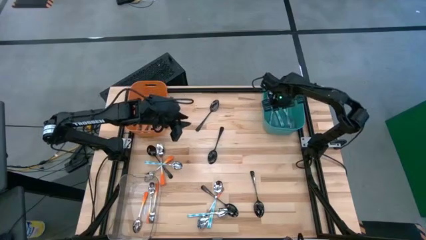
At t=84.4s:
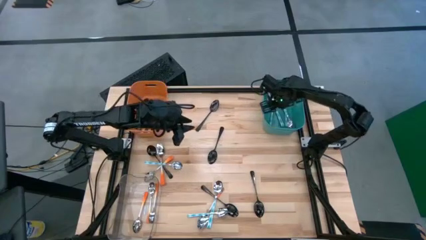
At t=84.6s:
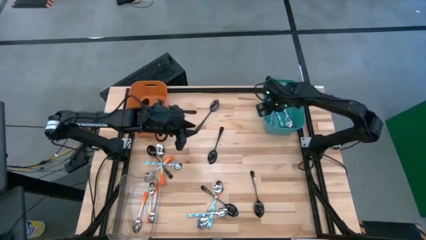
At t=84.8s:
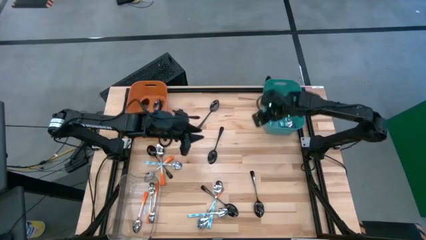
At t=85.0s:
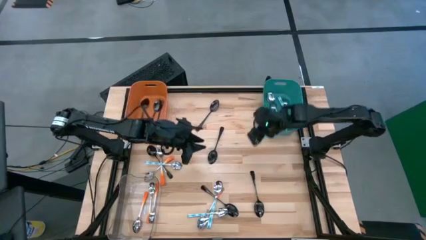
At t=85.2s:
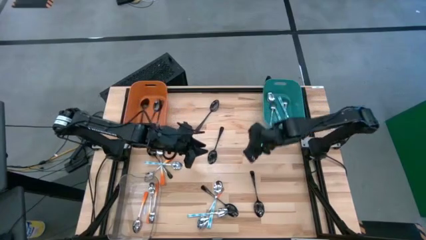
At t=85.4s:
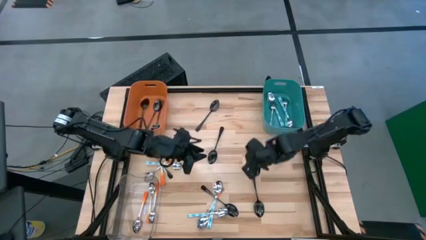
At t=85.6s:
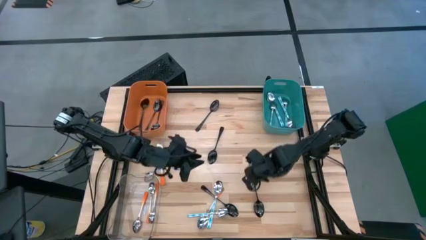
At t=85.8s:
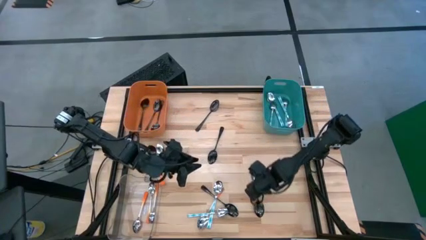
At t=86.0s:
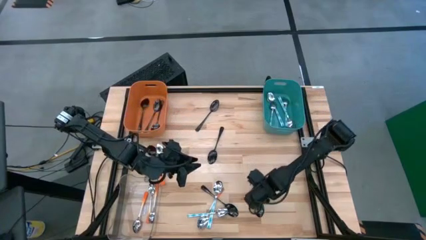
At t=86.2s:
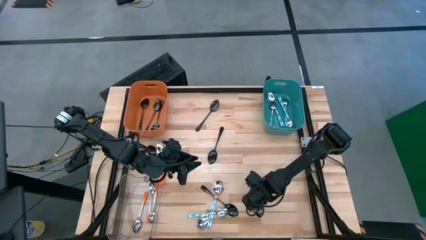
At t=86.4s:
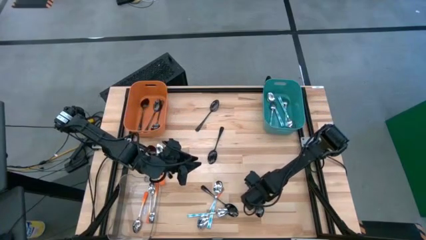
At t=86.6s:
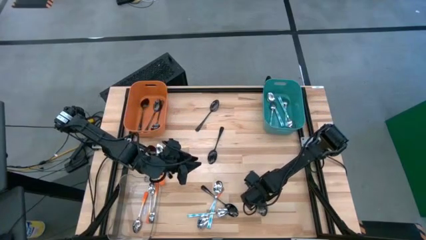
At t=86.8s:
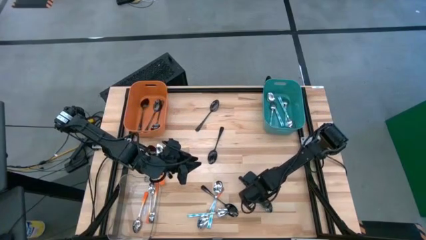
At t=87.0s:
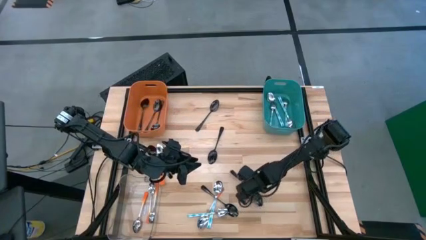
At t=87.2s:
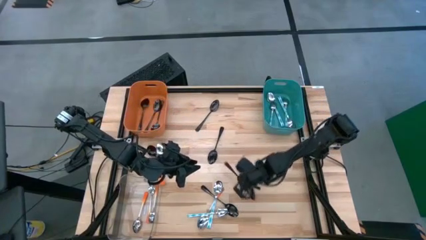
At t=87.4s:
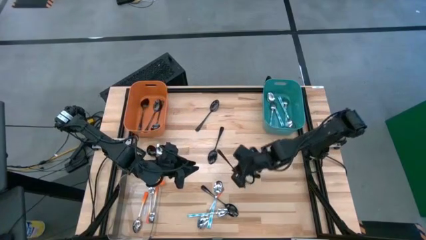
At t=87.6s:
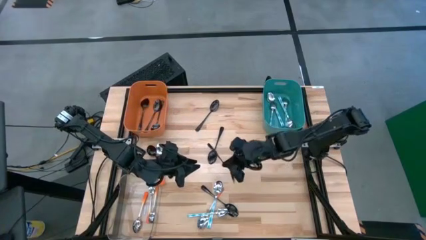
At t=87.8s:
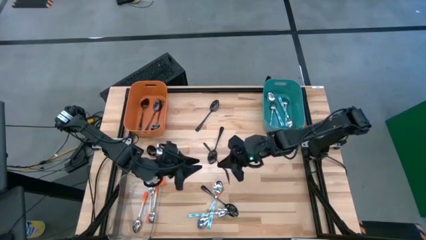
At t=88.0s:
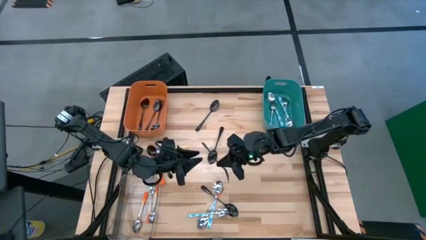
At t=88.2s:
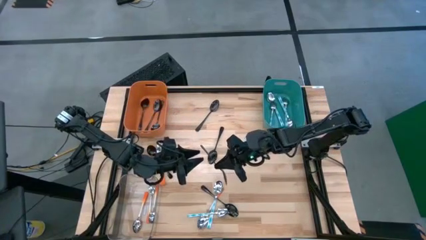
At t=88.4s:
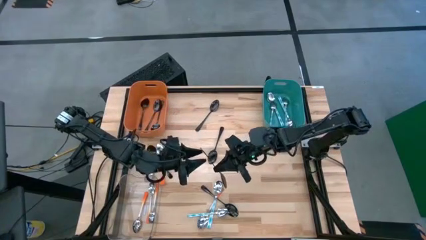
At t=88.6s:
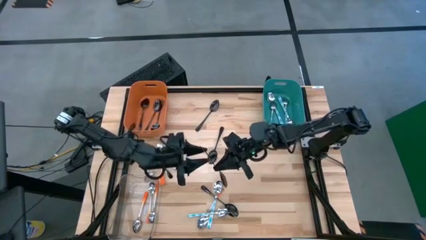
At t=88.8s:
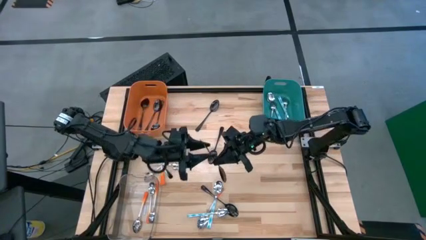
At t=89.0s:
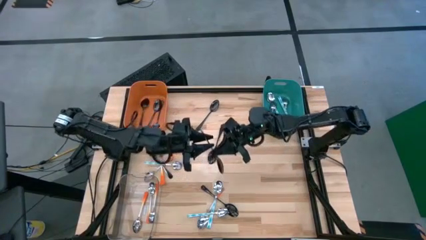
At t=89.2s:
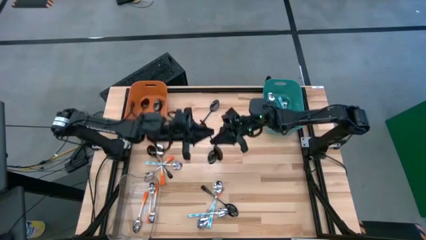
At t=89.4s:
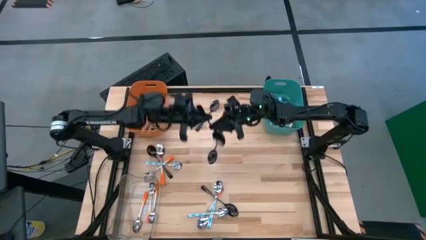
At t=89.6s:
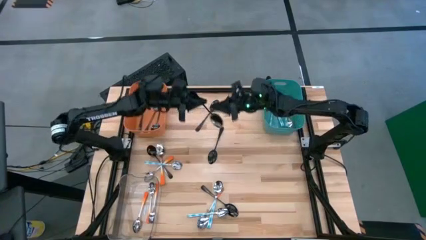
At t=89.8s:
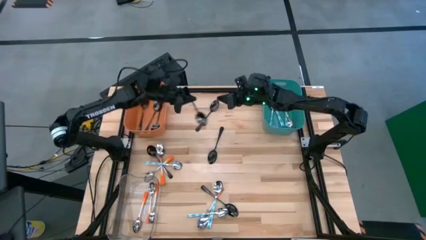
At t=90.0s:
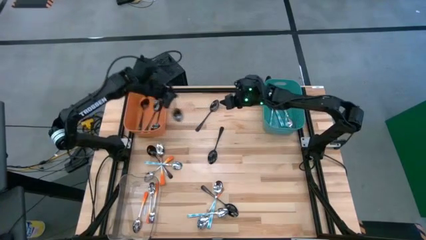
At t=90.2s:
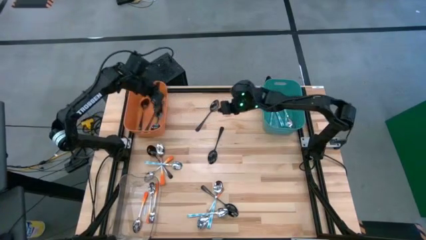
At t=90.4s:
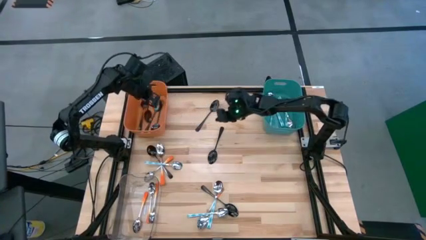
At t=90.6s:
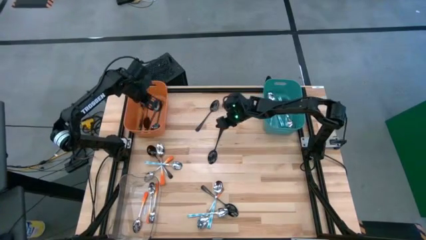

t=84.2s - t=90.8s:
Task: Sort silverware by color (type)
Put the black spoon into the orange bin

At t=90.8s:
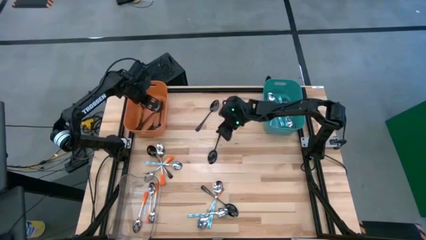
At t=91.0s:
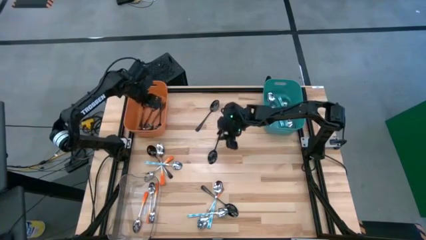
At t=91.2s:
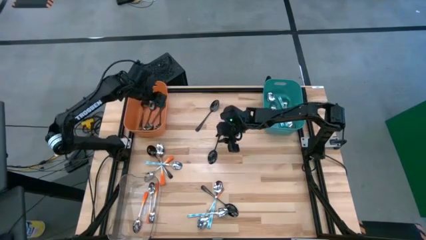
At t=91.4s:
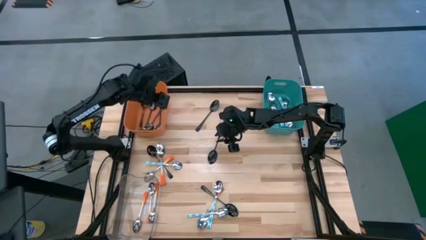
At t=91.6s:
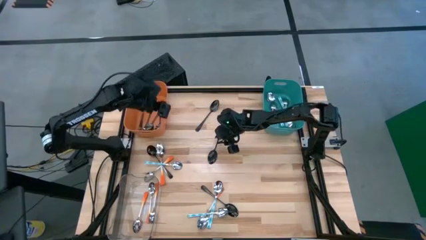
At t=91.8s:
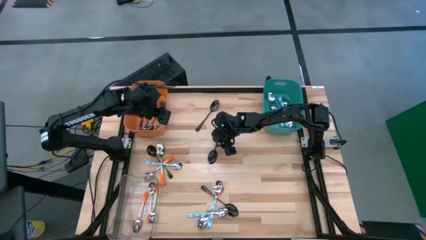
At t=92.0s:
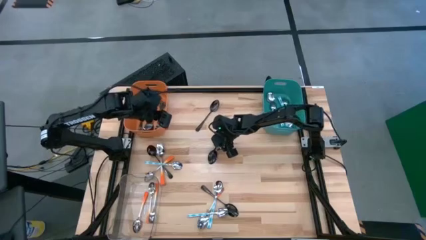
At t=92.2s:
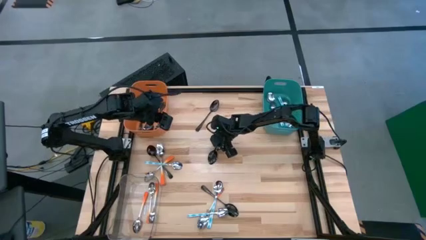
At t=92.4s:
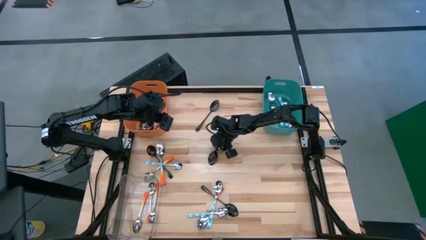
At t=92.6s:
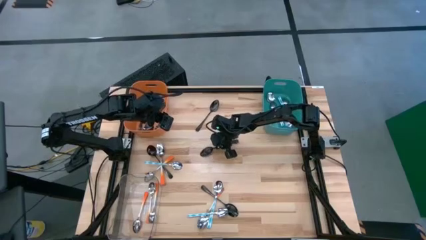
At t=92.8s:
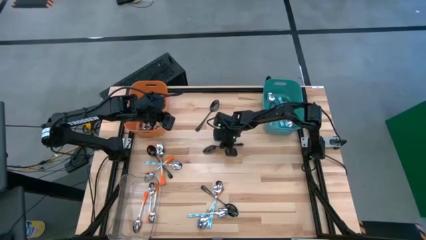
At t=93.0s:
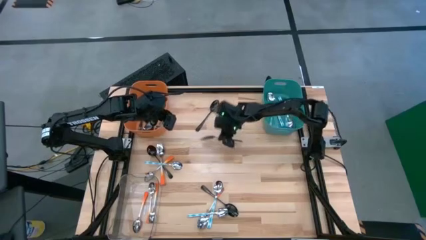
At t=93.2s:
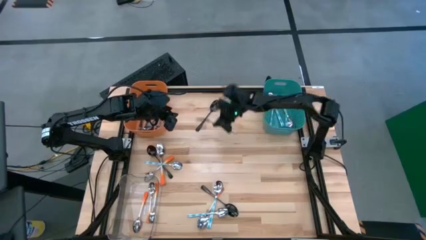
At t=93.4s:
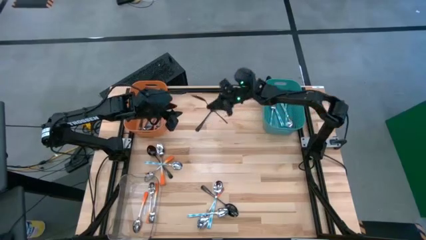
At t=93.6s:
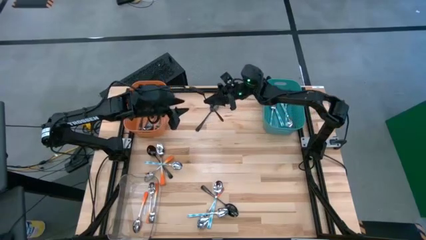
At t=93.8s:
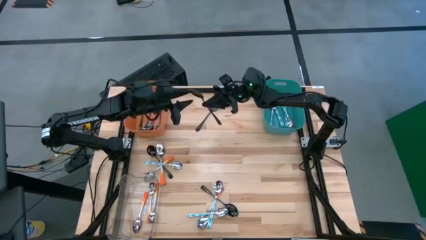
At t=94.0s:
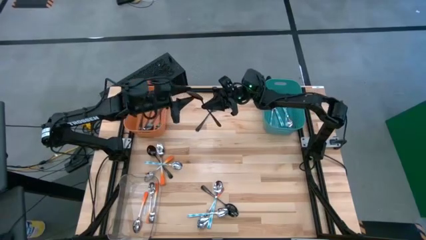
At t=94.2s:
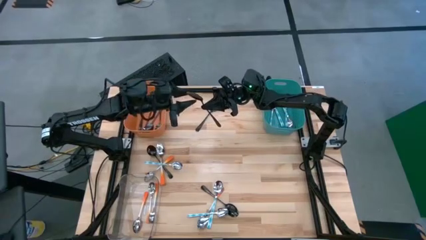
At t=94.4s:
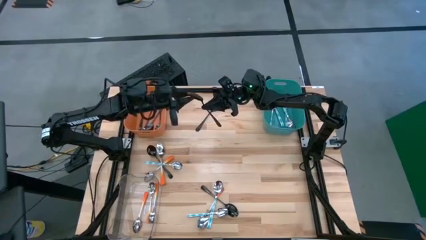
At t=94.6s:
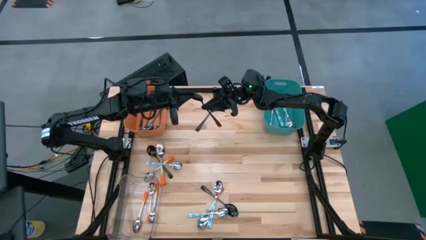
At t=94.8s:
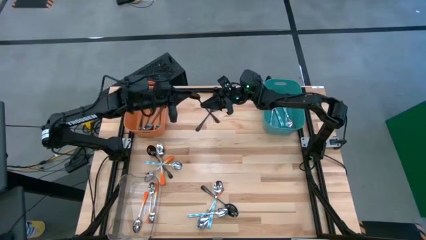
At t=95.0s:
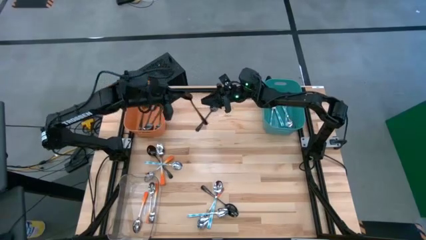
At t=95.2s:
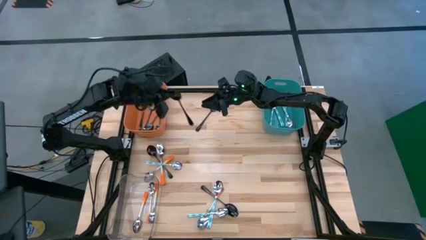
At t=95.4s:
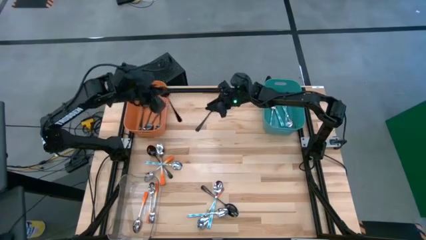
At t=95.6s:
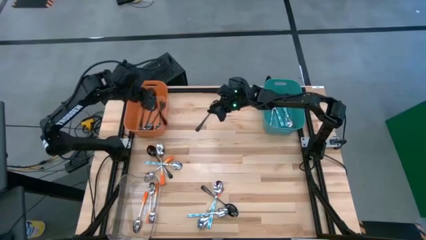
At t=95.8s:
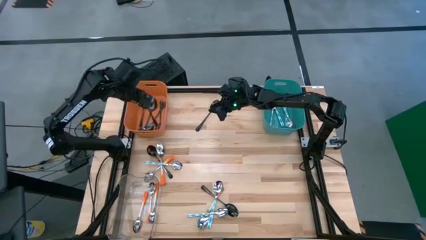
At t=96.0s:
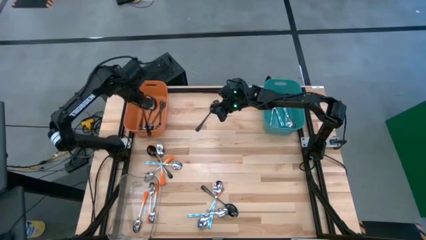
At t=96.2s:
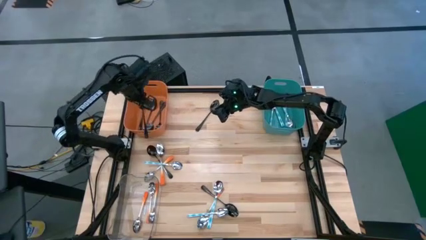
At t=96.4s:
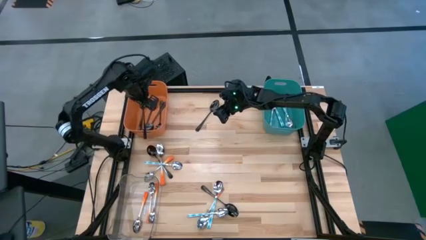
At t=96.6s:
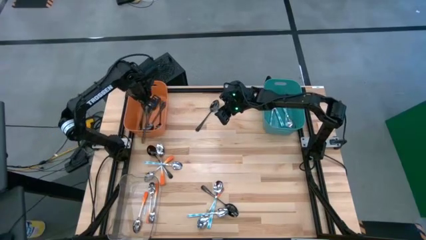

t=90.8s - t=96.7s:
Put the black spoon into the orange bin

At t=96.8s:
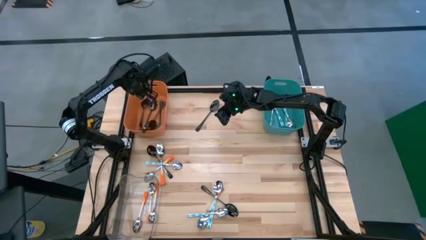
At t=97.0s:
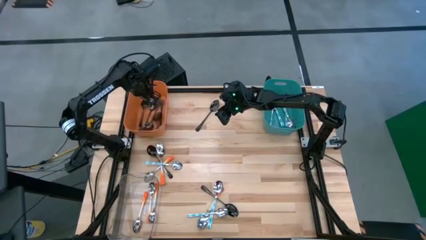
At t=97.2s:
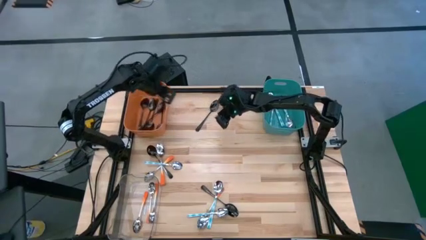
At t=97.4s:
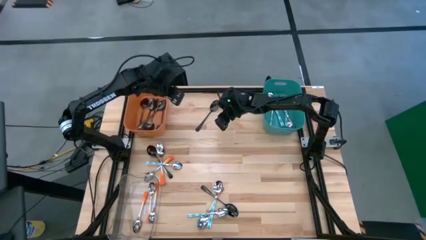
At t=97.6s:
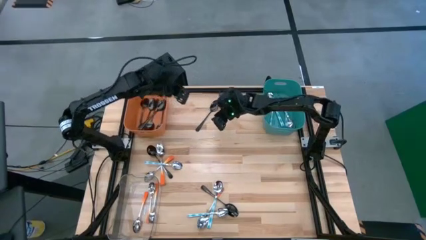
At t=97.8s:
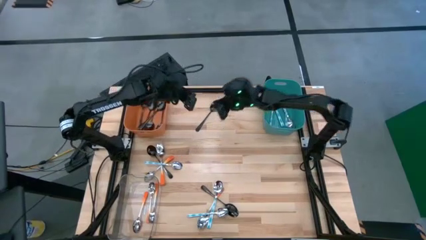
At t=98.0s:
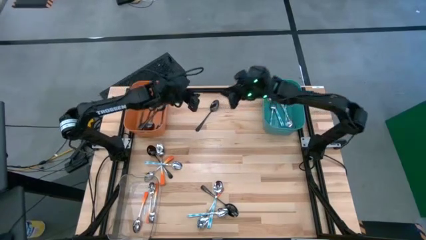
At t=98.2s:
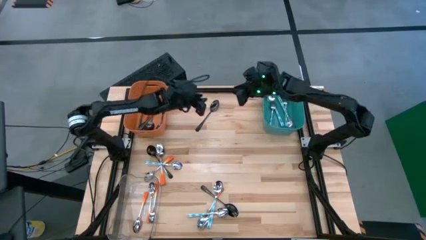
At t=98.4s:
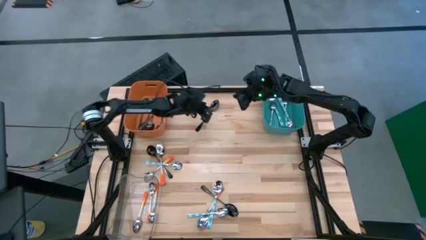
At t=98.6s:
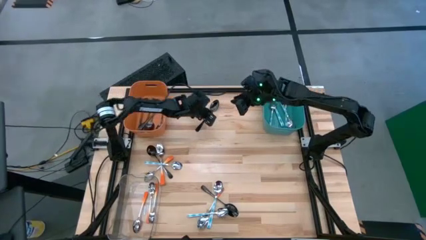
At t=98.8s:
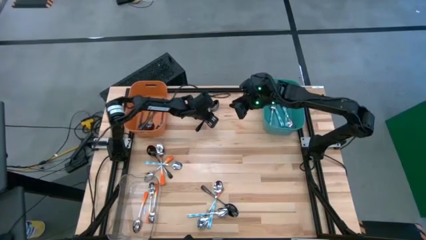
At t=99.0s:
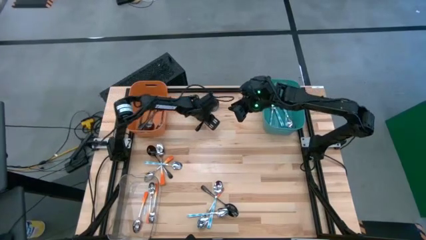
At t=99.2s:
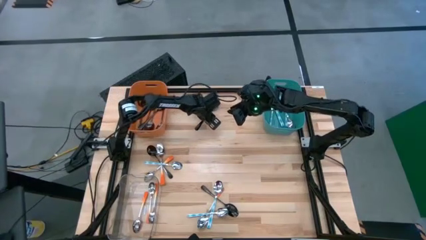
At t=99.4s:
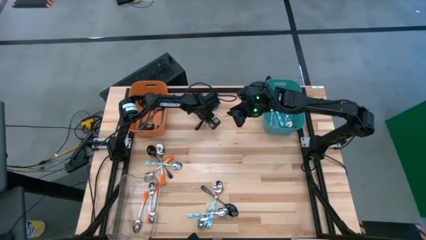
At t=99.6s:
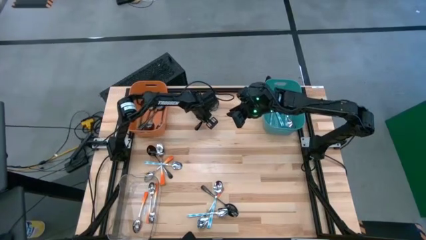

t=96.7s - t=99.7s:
Put the black spoon into the orange bin

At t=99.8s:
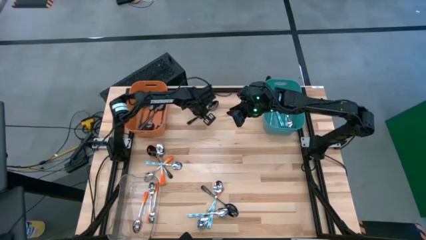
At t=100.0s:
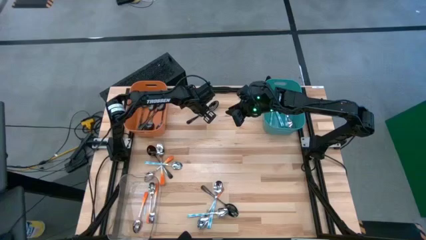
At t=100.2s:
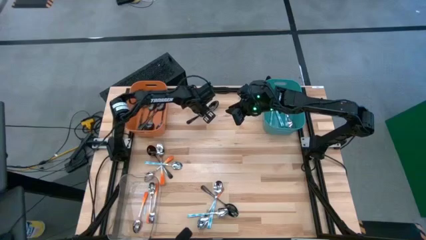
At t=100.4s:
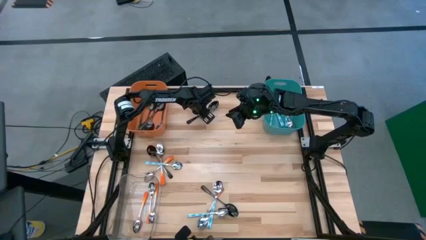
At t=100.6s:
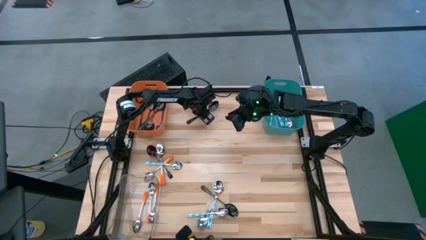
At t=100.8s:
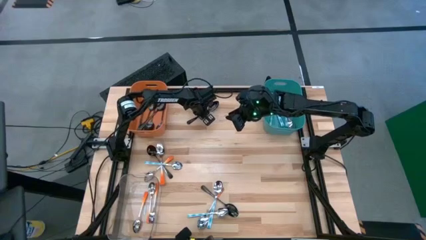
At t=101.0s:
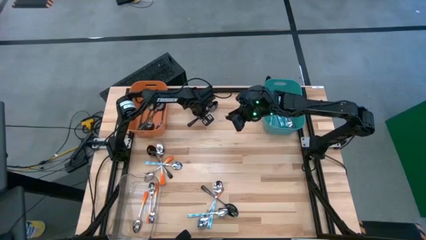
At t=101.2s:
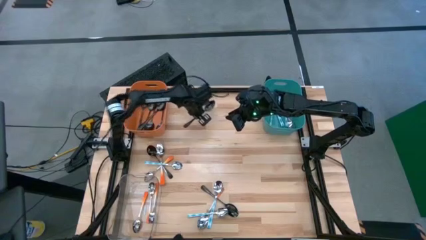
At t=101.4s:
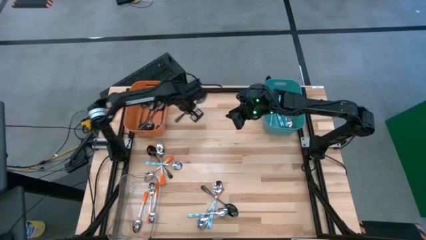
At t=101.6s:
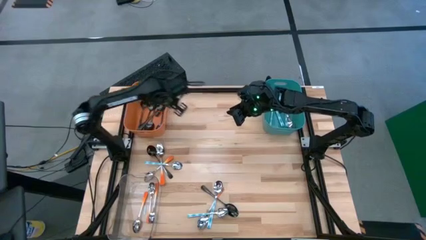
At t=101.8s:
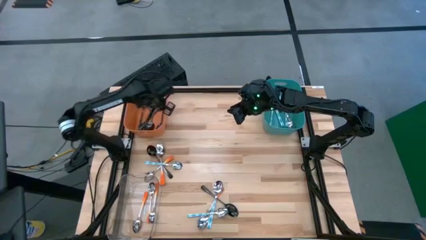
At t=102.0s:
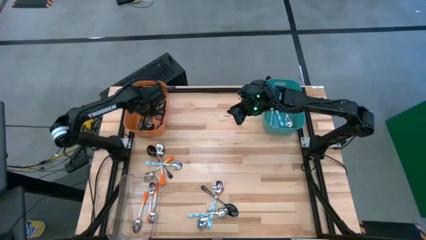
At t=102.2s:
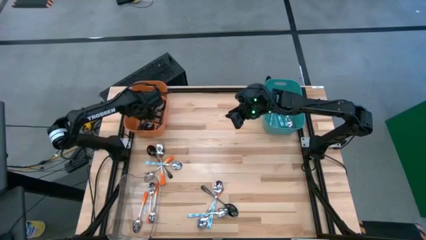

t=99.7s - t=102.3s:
Put the black spoon into the orange bin
